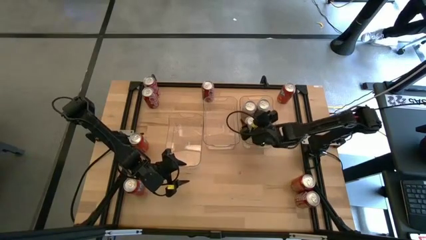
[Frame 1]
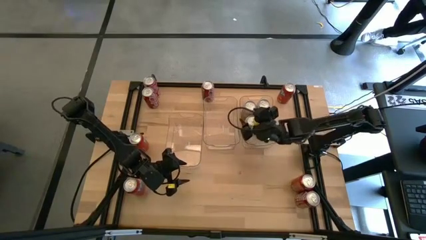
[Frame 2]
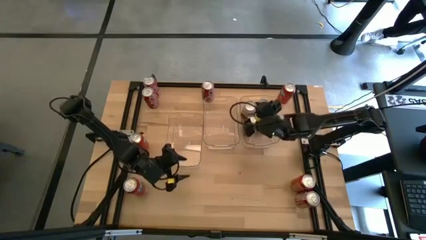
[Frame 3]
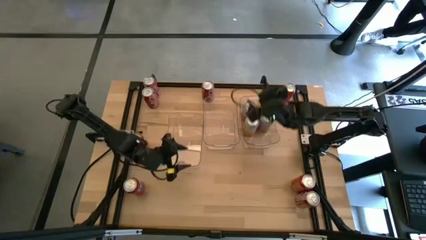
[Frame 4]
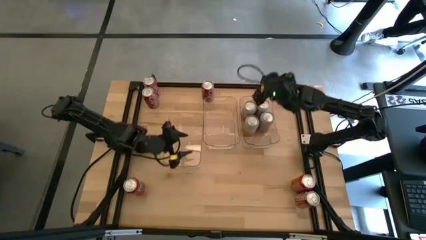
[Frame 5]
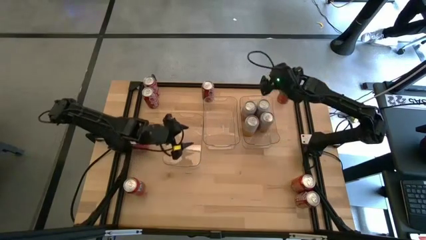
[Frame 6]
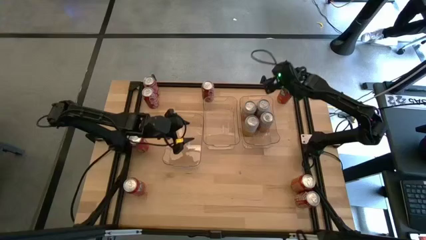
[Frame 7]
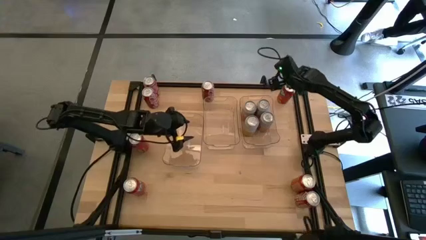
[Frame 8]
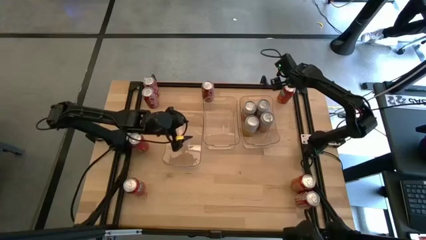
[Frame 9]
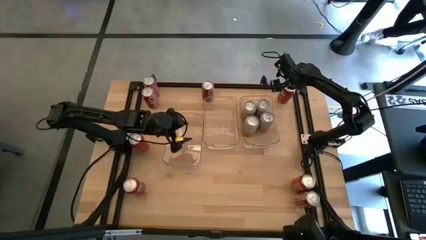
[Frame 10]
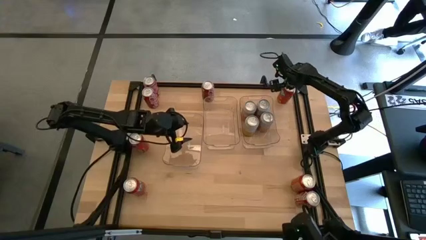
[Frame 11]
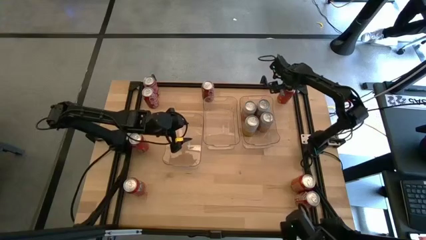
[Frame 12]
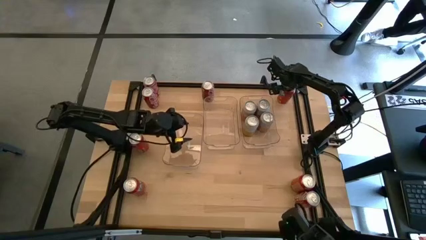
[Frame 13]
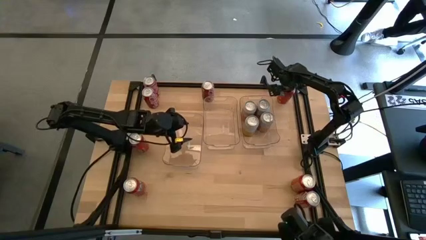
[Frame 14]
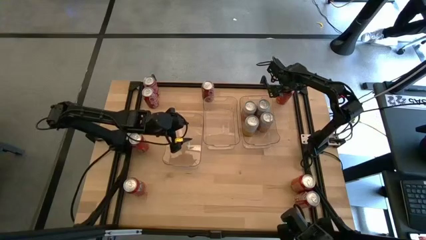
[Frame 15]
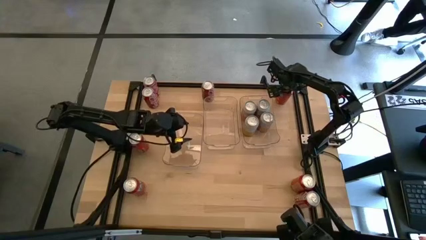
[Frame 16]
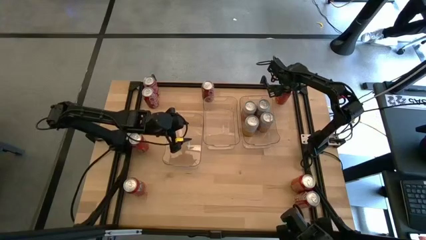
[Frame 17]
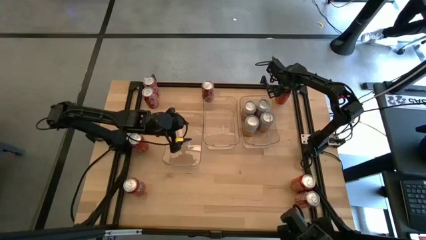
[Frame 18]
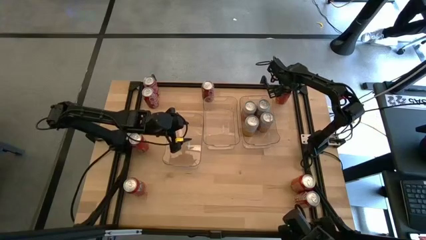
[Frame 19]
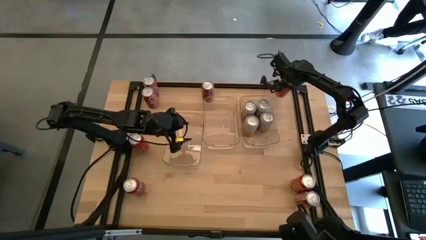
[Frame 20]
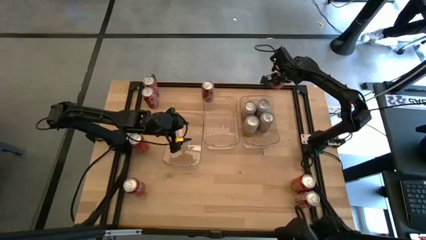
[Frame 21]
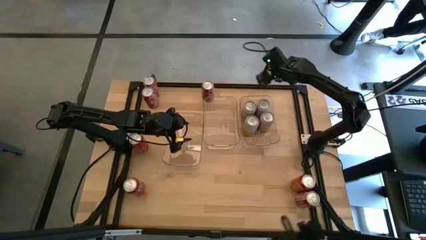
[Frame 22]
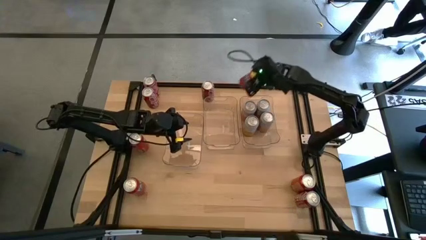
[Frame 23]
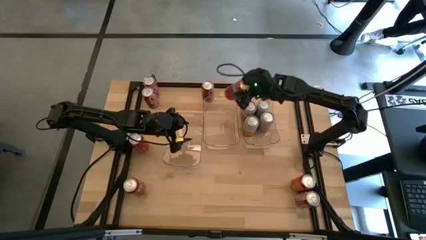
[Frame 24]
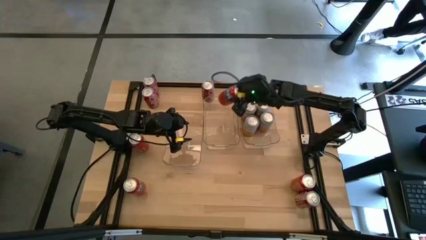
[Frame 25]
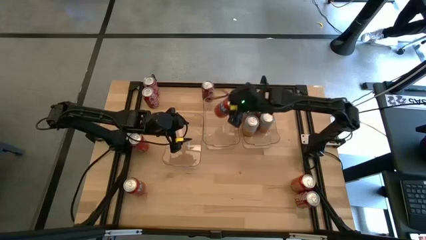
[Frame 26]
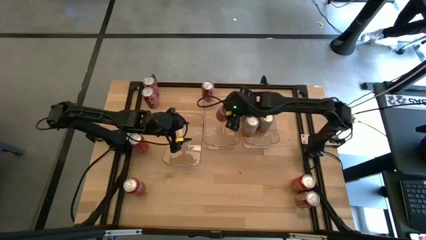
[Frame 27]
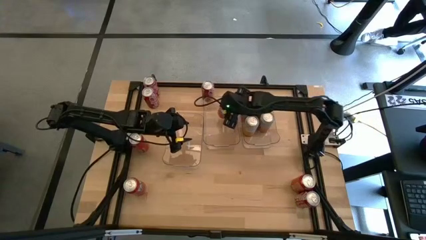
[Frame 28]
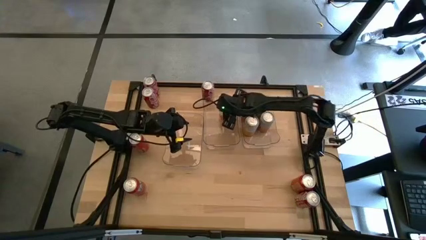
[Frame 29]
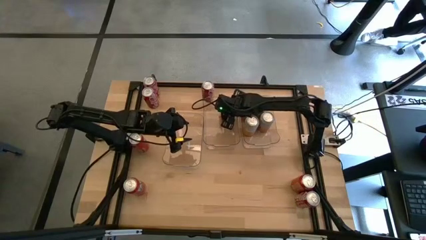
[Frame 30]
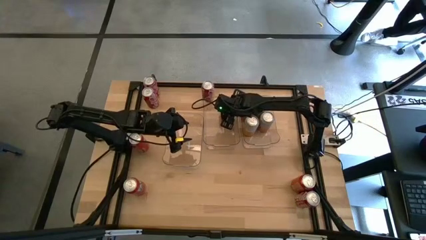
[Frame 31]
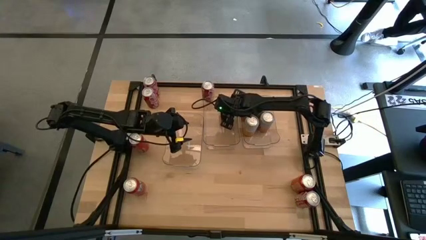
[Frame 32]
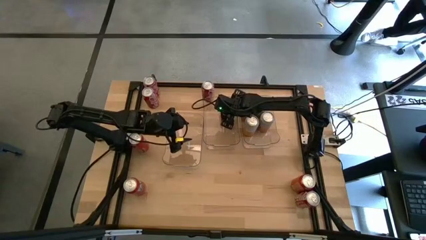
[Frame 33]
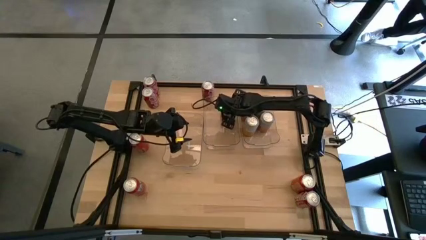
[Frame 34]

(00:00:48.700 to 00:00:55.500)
Task: Sort soda cans
Put the top orange soda can into the middle transparent bin

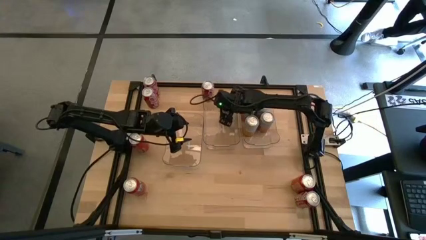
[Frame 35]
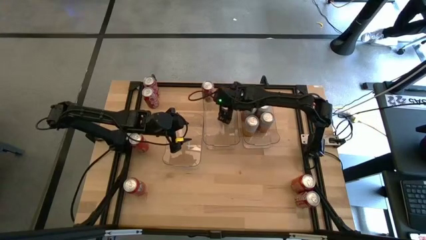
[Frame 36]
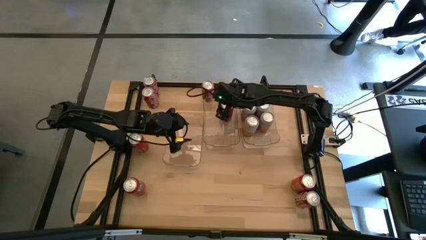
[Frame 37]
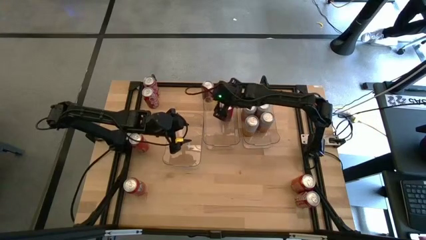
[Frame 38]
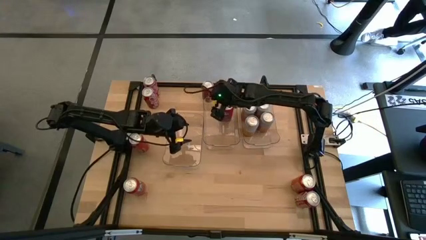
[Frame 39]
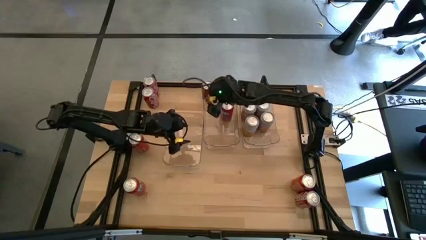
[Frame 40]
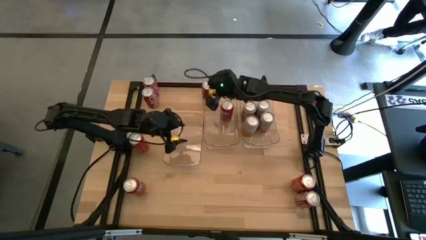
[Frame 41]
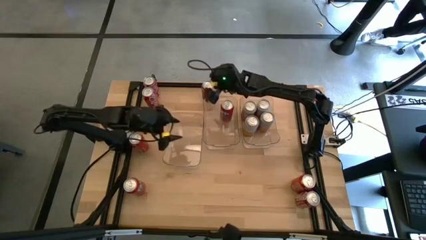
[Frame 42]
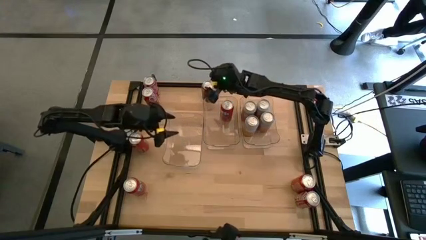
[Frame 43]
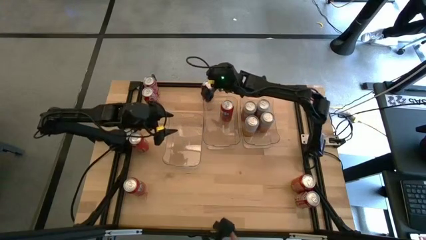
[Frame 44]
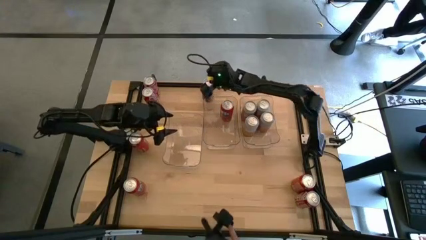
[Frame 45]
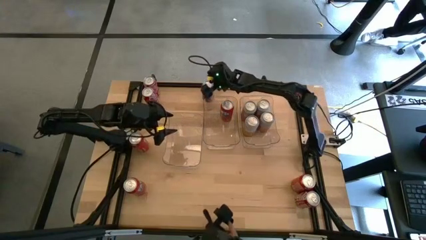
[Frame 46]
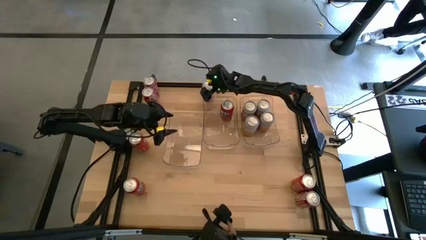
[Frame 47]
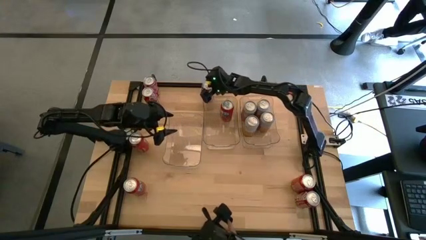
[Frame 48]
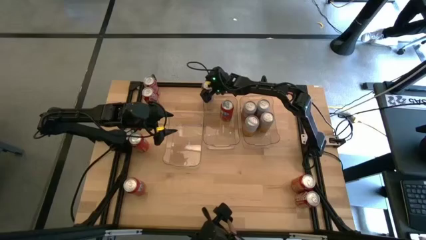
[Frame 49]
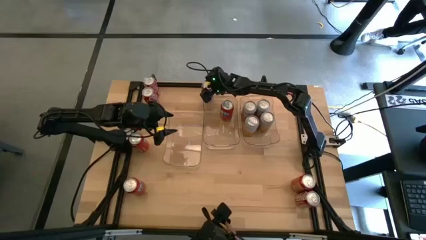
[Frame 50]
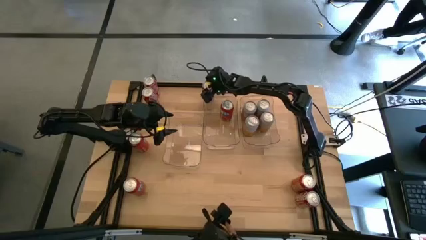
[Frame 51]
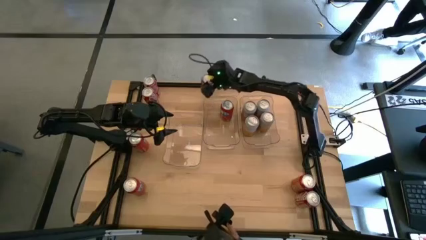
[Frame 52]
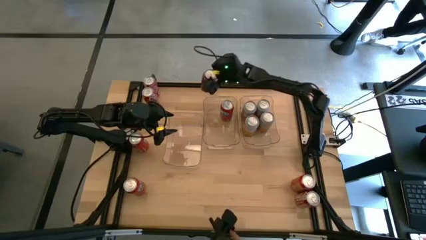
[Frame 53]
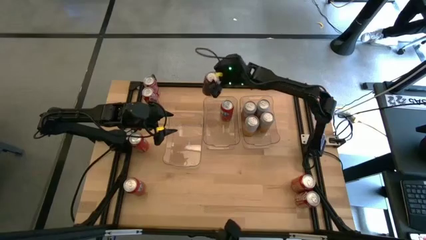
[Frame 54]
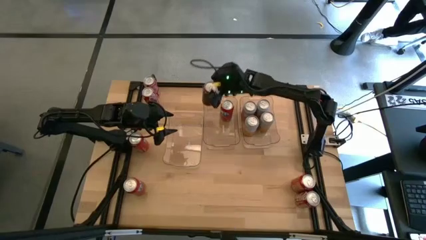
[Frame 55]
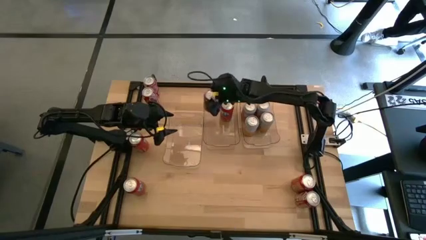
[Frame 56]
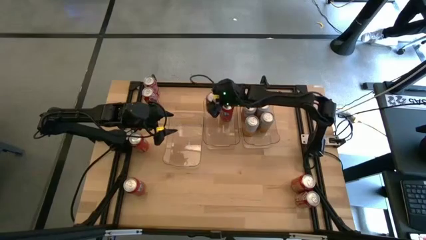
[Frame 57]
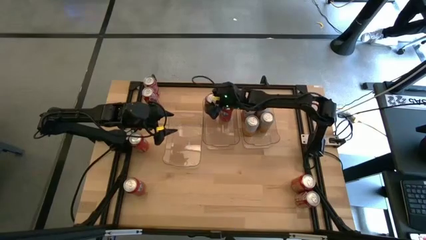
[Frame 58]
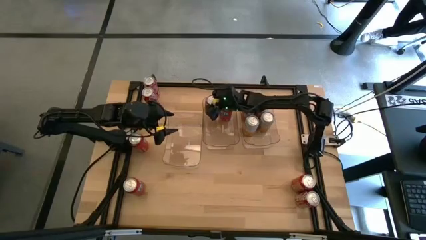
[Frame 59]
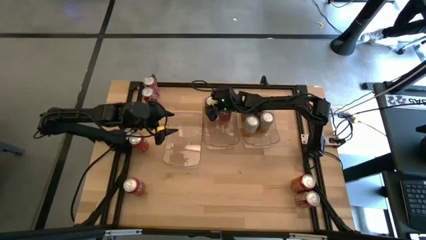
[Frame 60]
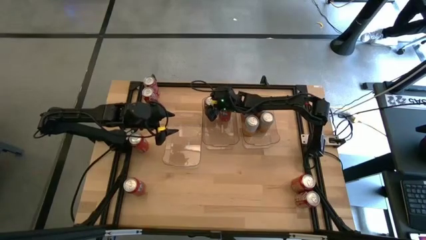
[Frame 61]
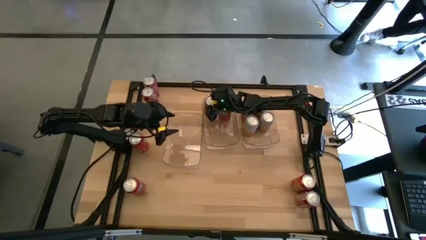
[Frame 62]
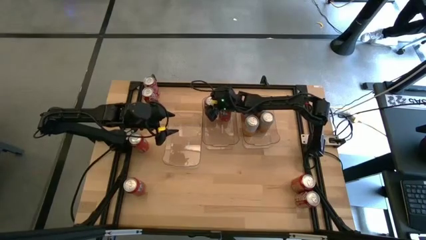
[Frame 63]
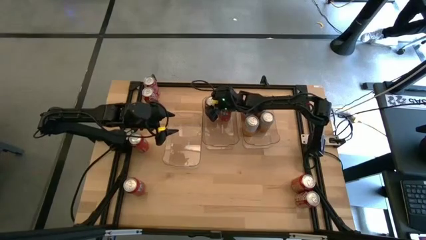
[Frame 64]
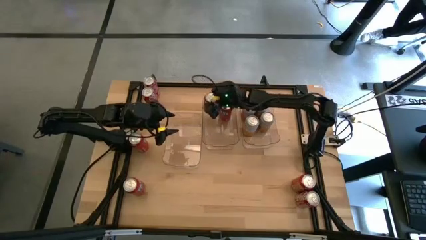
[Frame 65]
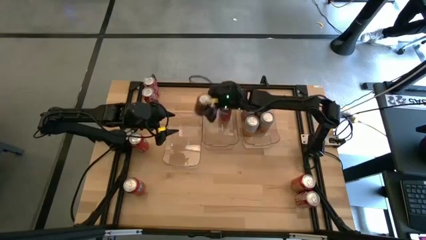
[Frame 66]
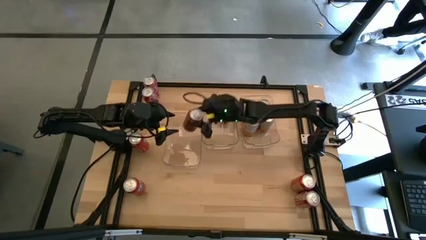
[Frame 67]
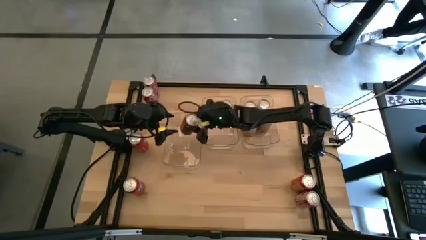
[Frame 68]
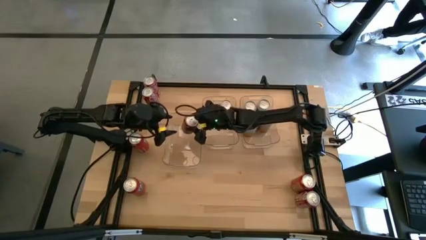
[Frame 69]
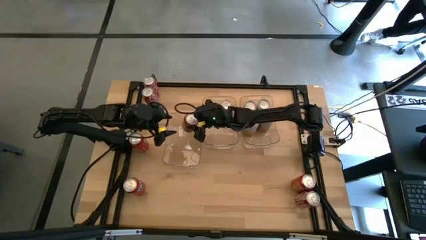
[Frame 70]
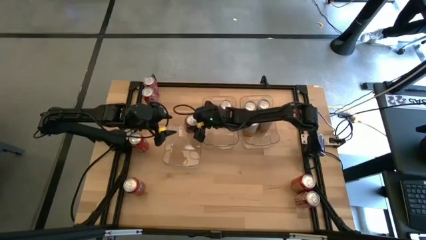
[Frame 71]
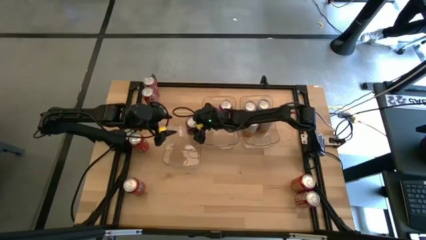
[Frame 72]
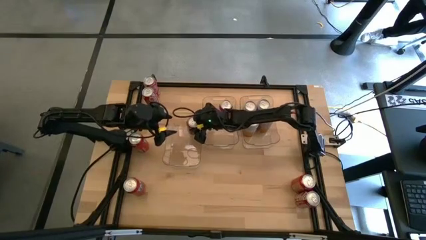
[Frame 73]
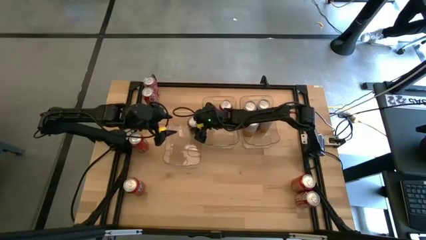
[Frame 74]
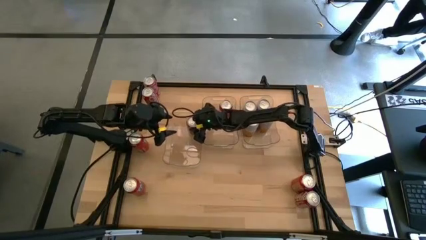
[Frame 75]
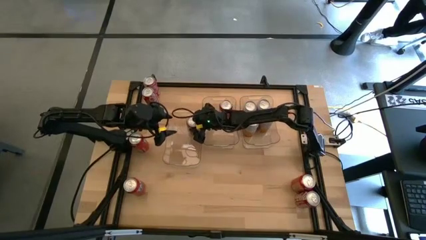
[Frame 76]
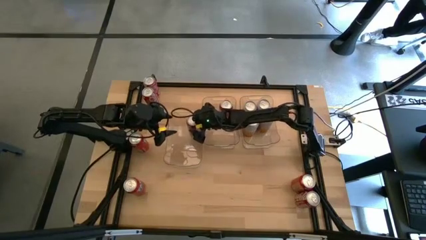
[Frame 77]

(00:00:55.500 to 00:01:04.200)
Put the top center red soda can into the middle left transparent bin

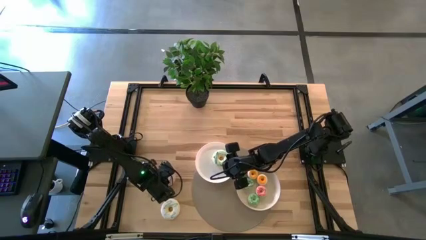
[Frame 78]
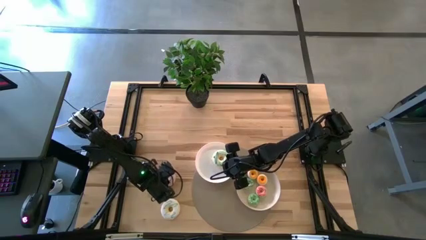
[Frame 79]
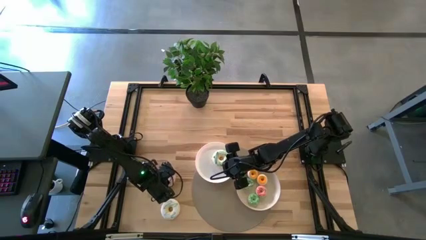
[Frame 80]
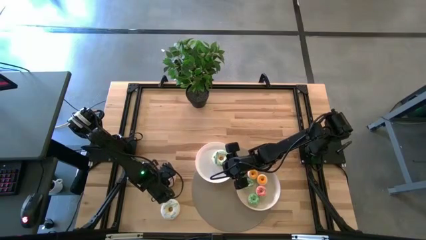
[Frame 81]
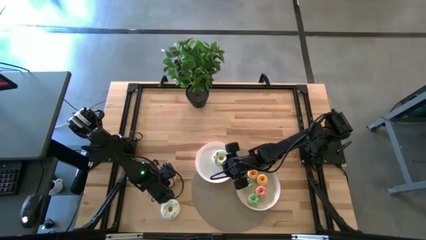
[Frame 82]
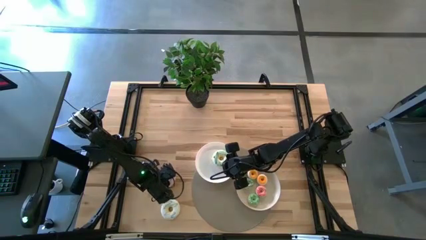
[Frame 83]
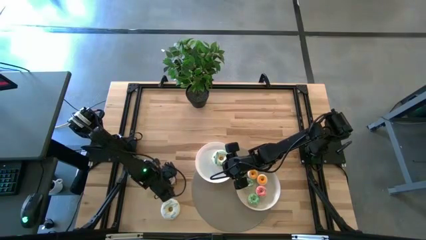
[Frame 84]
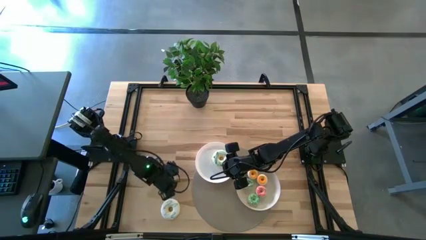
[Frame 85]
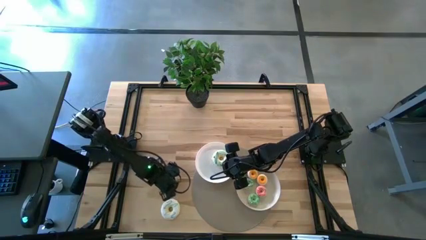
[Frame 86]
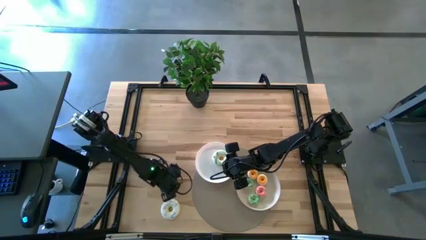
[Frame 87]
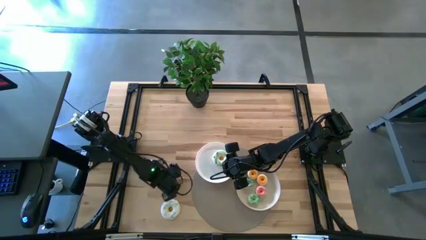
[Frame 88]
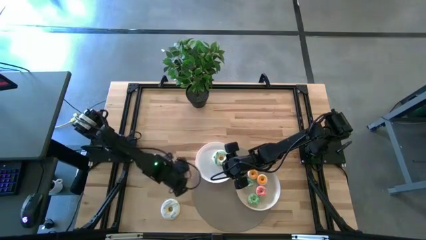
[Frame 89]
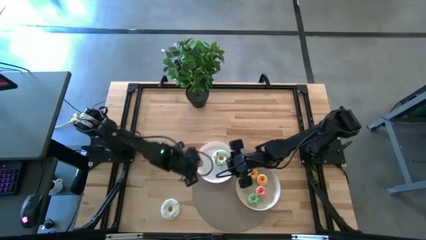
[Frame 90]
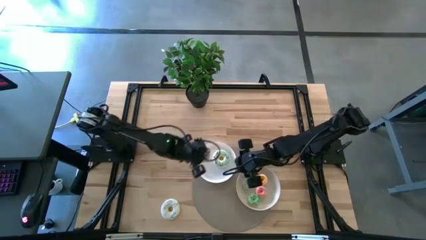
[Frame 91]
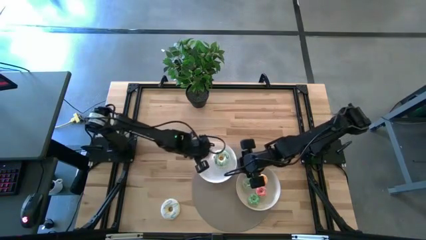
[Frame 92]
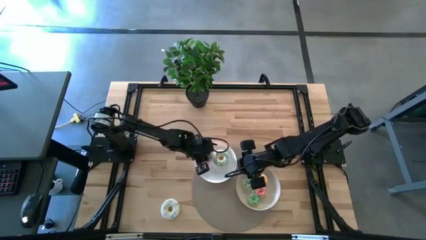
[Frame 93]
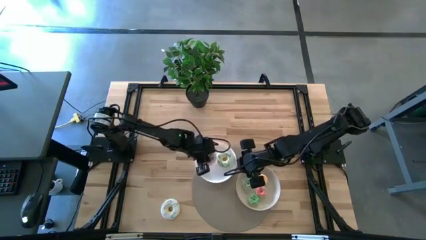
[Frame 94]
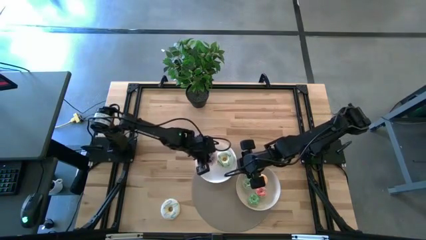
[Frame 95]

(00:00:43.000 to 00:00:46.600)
Task: Pick & Place donuts
Put the big light purple doughnut on the white plate
